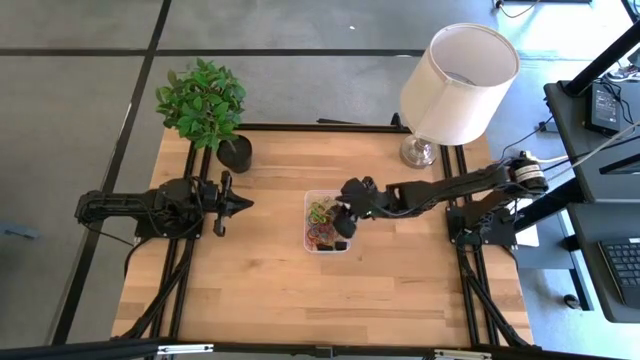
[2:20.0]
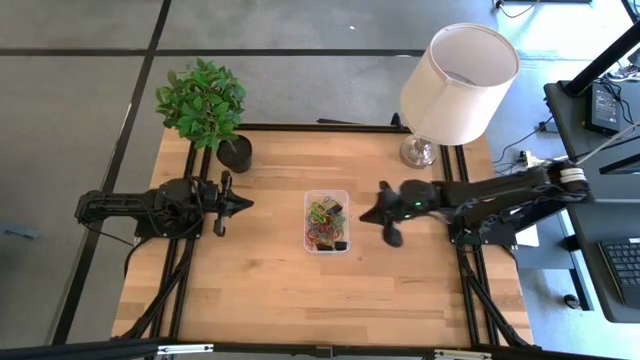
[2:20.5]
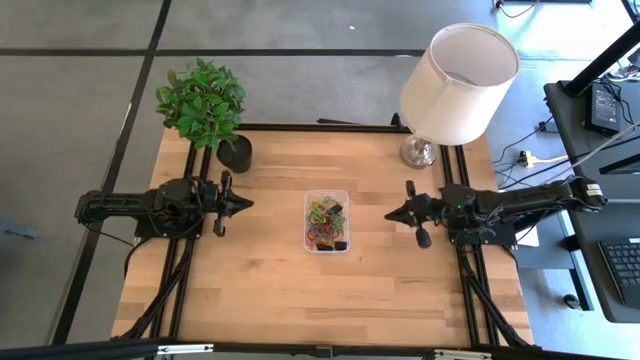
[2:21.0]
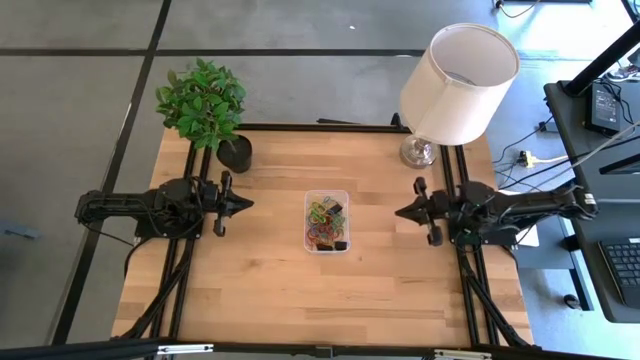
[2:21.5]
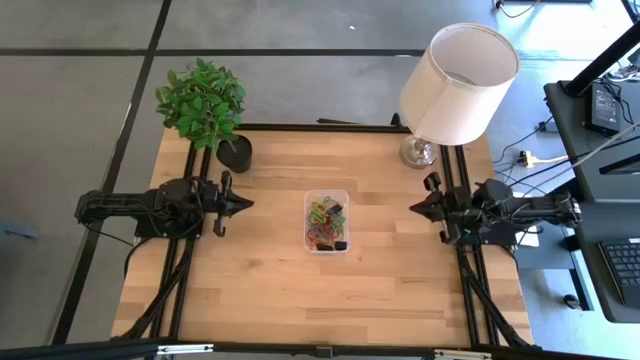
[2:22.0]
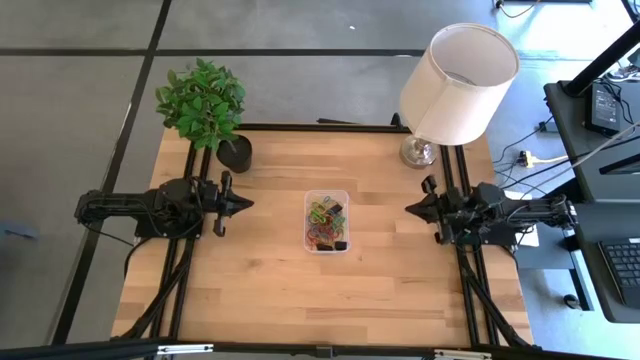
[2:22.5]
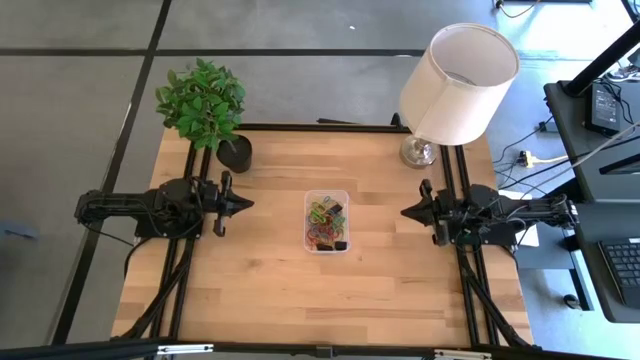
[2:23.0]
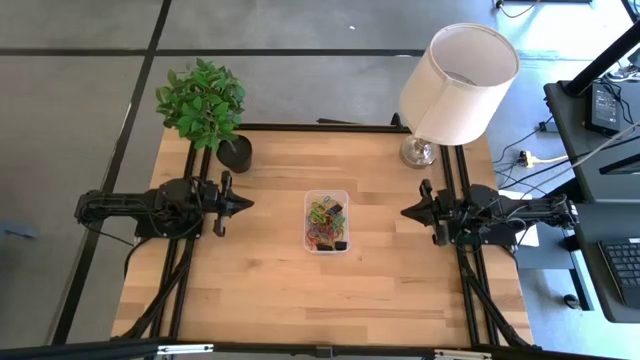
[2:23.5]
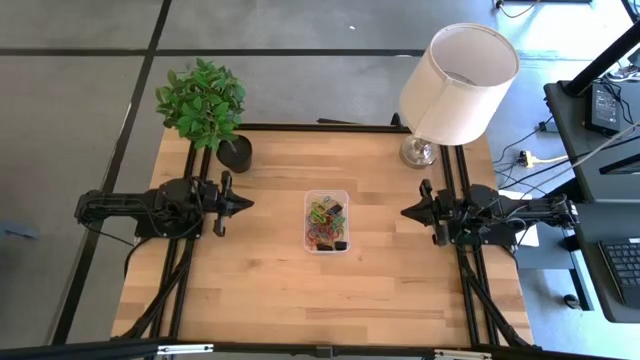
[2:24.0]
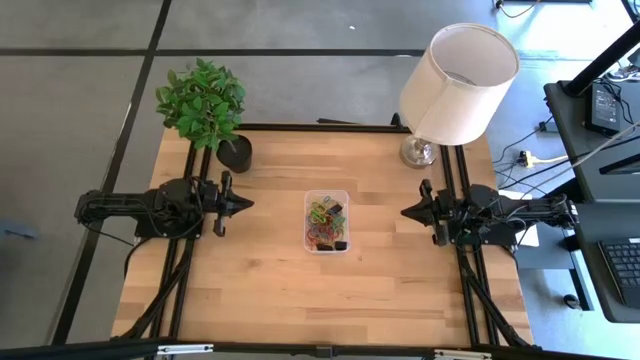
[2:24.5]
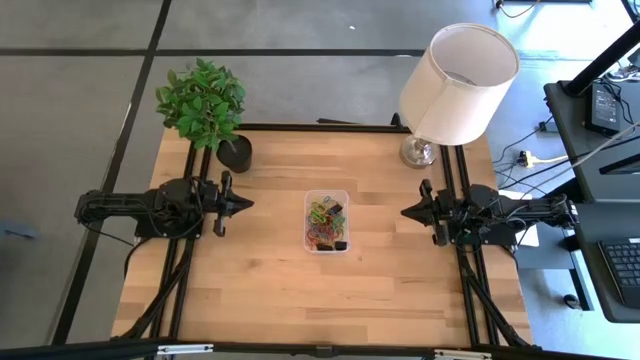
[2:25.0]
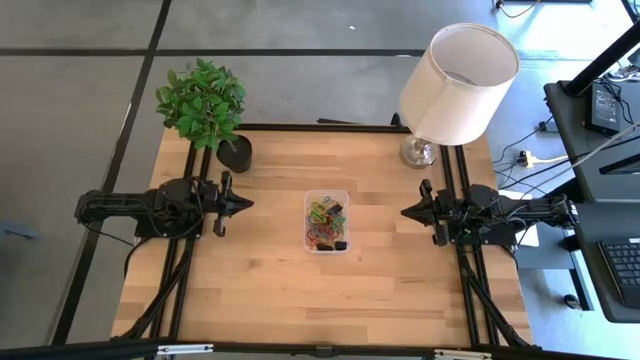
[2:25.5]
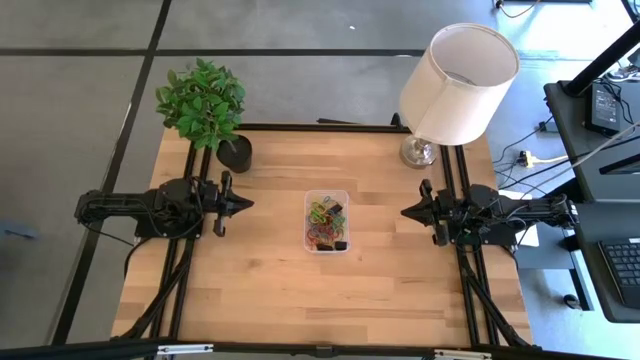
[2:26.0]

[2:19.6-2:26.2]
Task: Pick and place rubber bands into bin
Return to Home Position

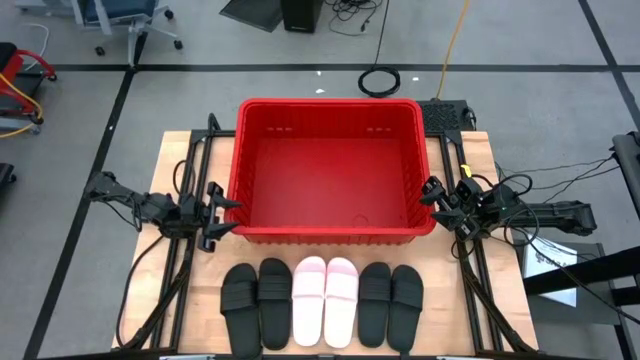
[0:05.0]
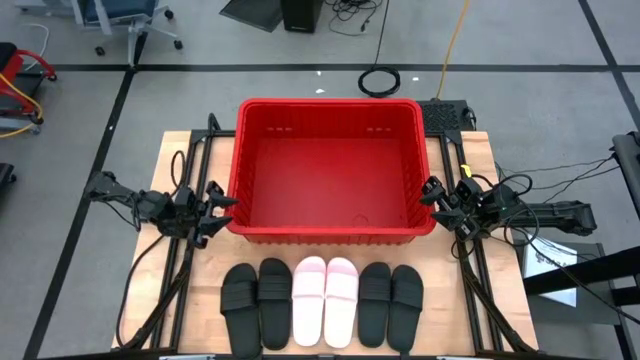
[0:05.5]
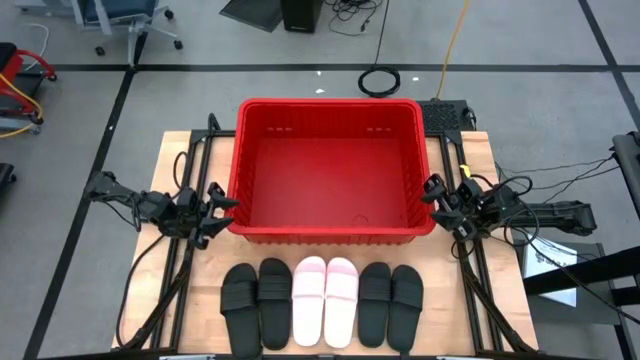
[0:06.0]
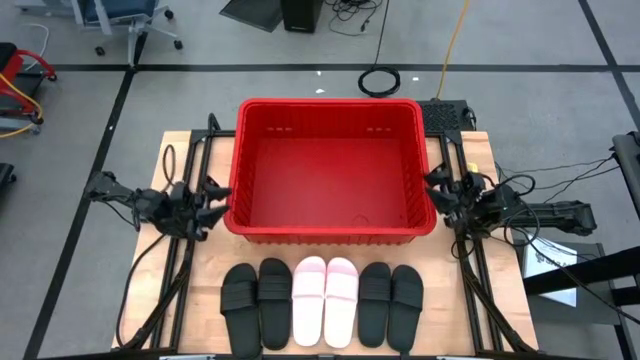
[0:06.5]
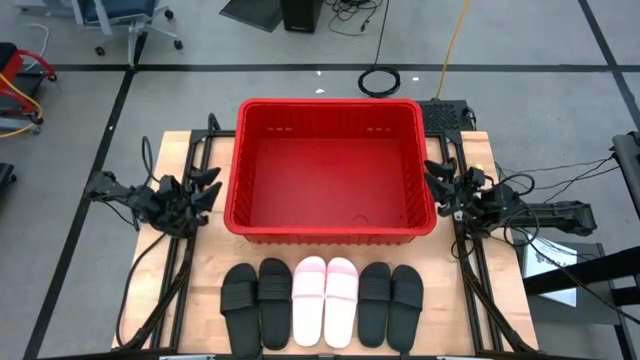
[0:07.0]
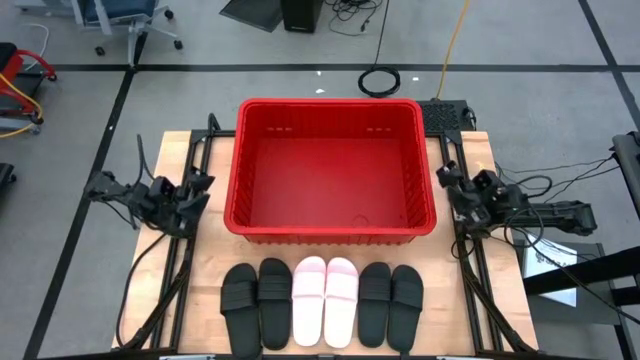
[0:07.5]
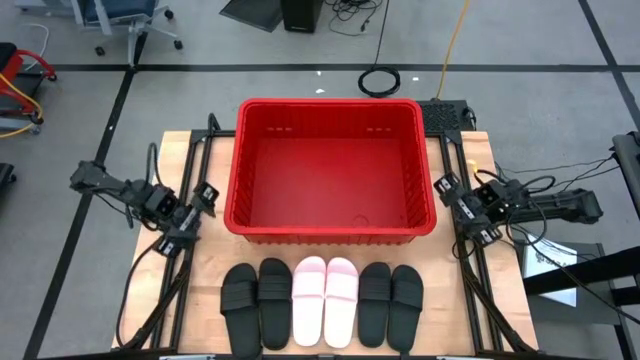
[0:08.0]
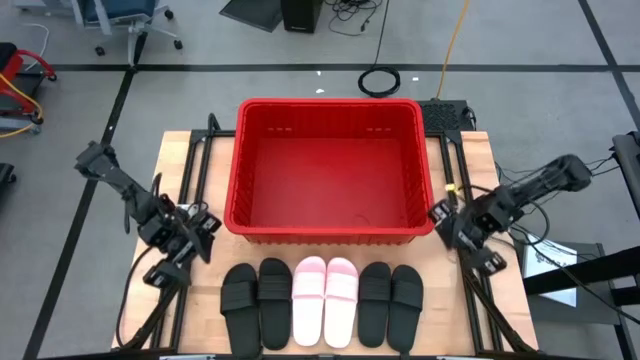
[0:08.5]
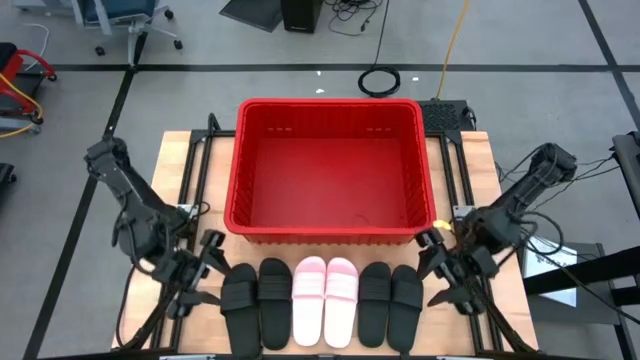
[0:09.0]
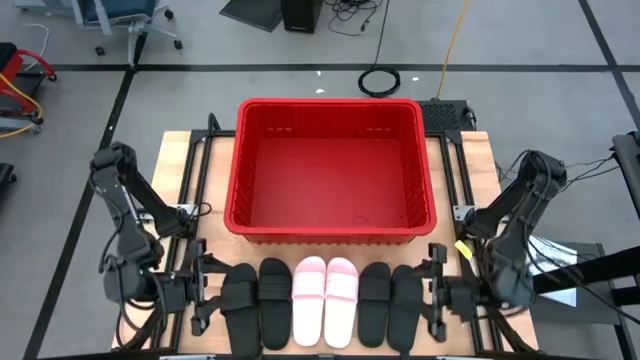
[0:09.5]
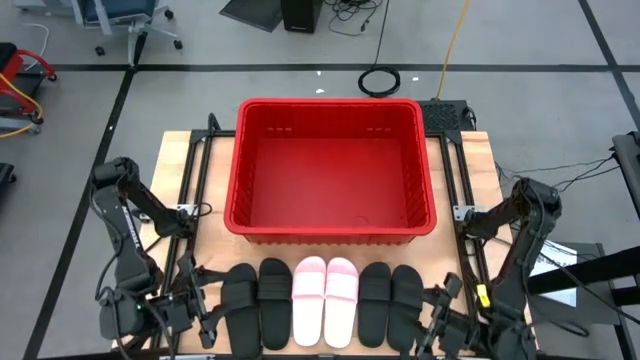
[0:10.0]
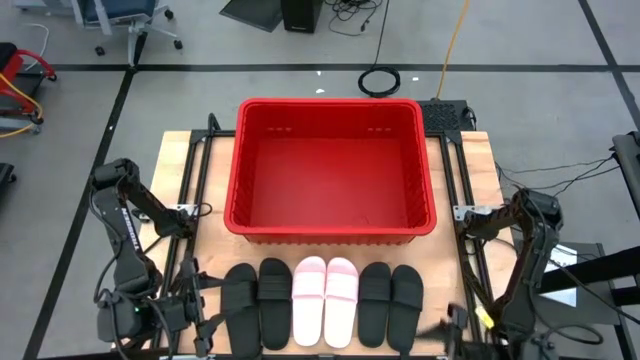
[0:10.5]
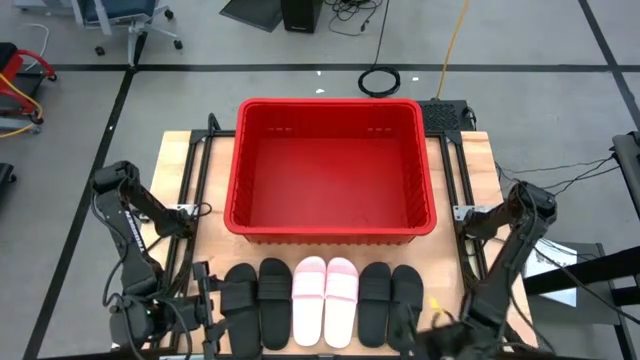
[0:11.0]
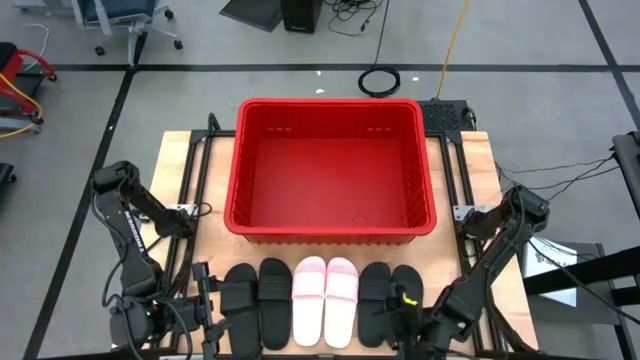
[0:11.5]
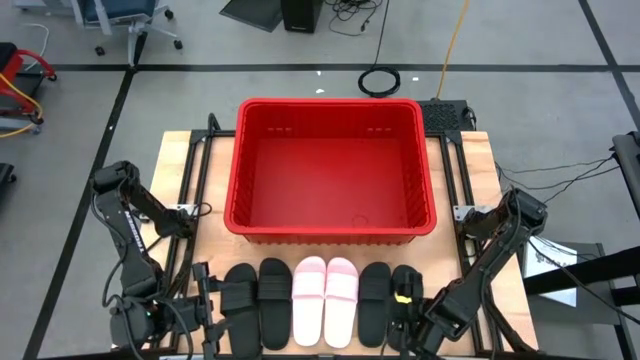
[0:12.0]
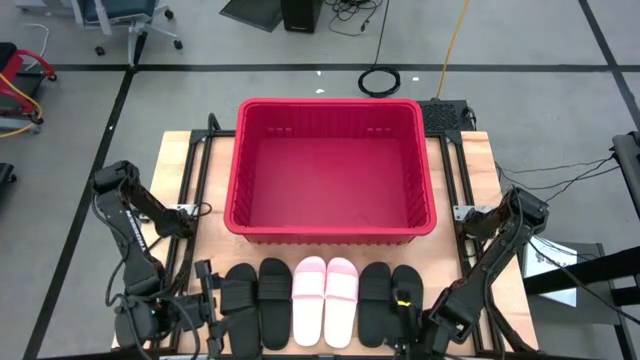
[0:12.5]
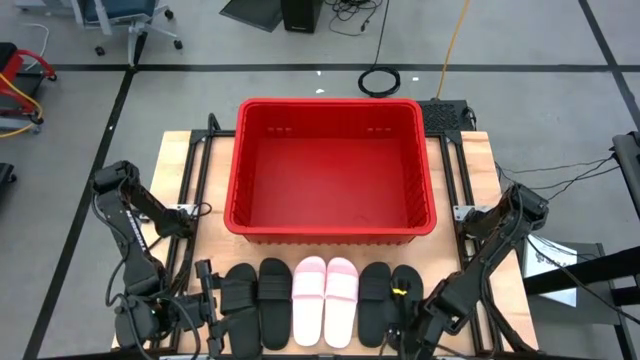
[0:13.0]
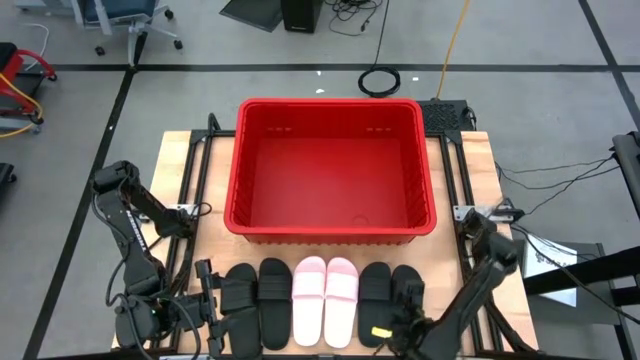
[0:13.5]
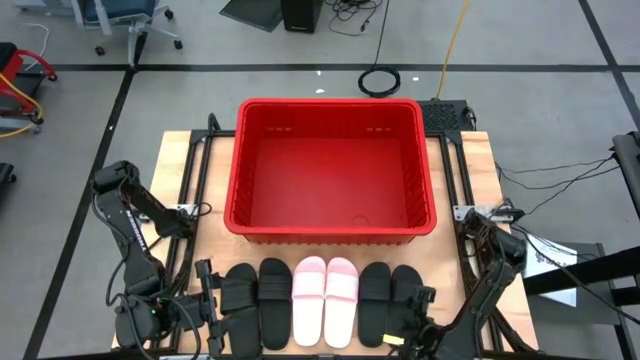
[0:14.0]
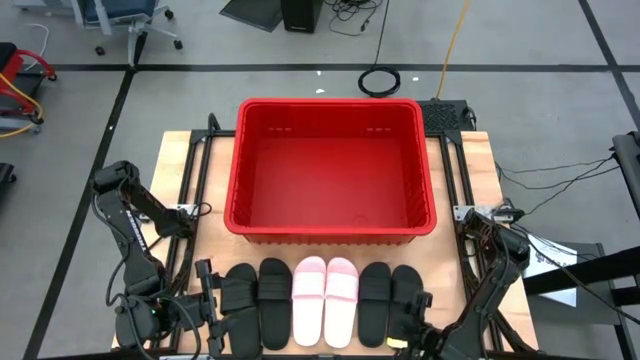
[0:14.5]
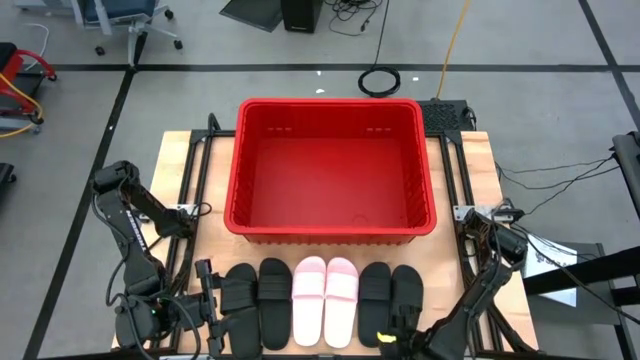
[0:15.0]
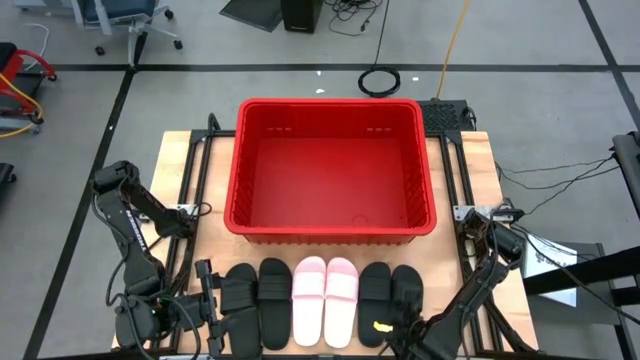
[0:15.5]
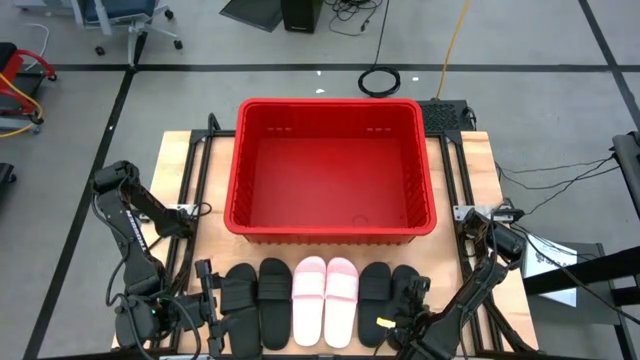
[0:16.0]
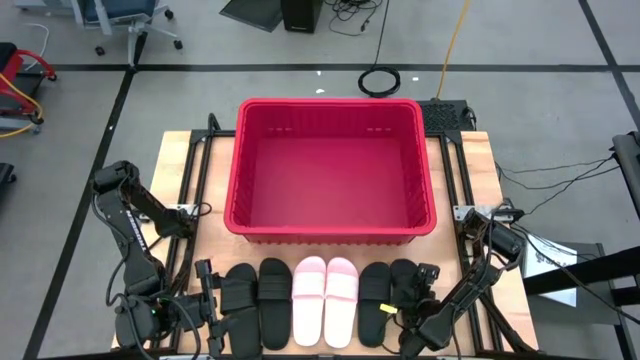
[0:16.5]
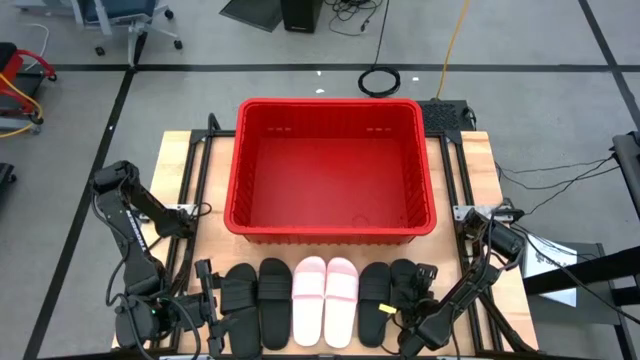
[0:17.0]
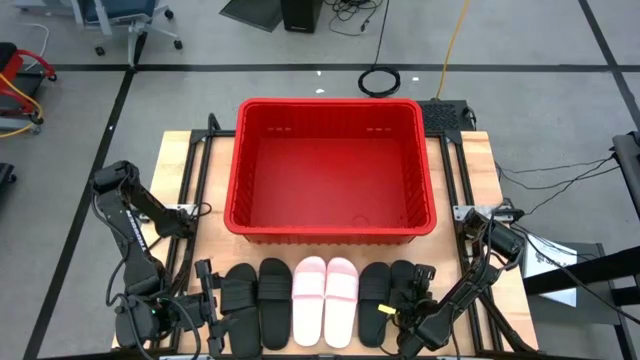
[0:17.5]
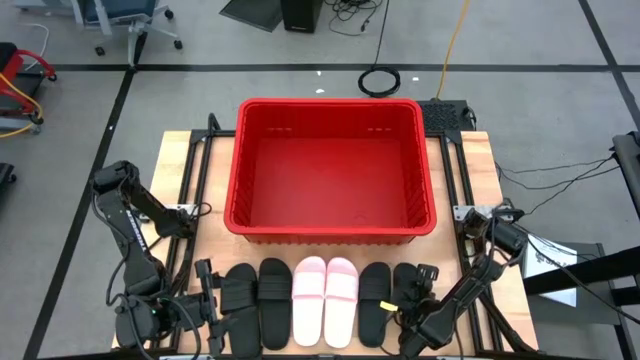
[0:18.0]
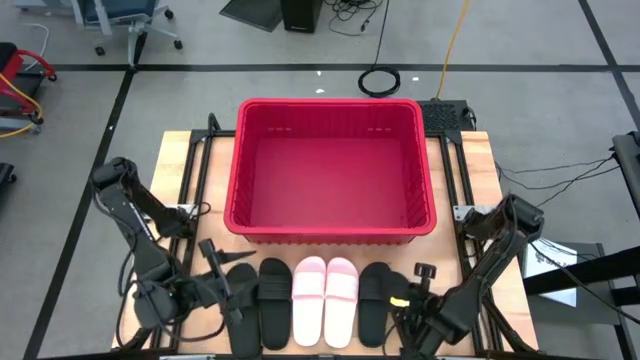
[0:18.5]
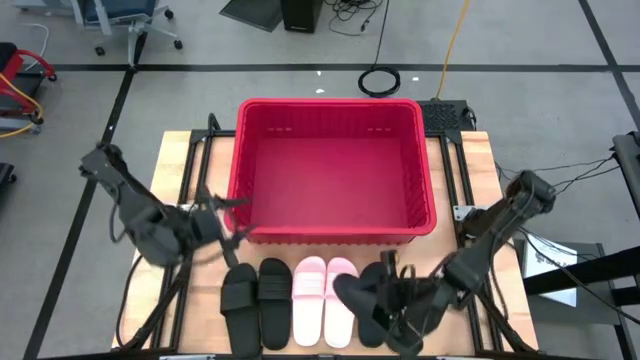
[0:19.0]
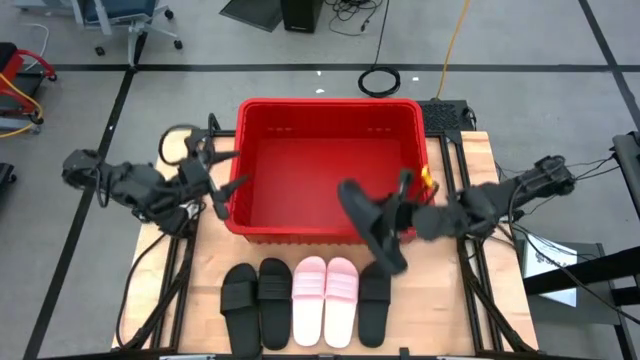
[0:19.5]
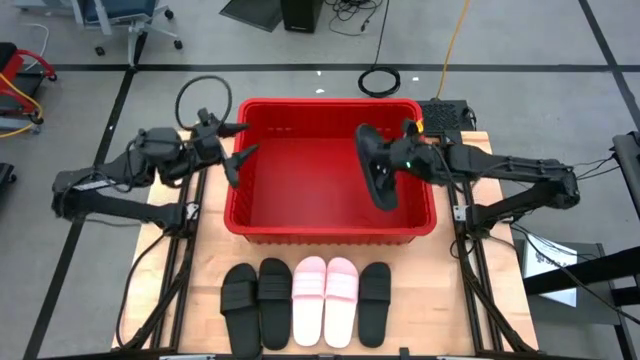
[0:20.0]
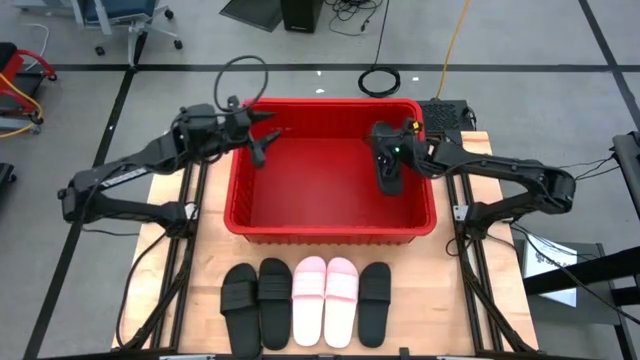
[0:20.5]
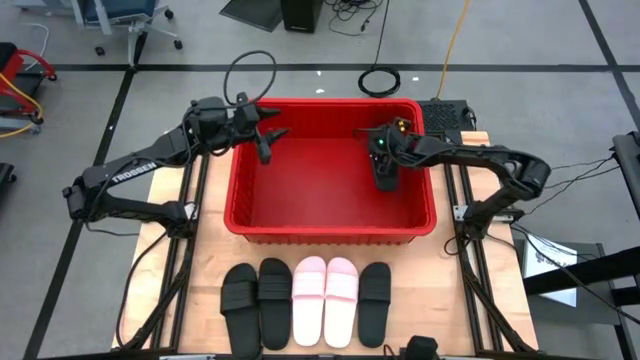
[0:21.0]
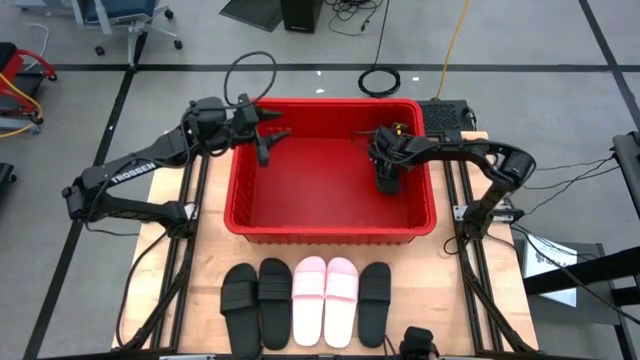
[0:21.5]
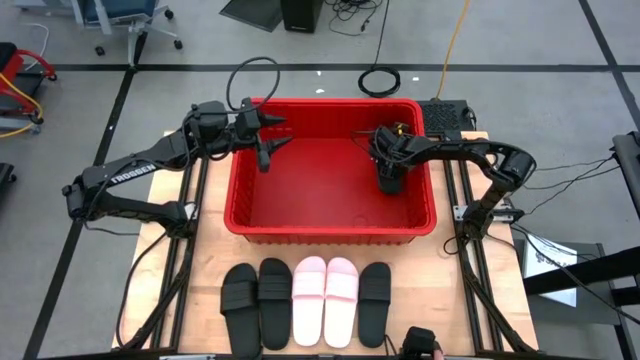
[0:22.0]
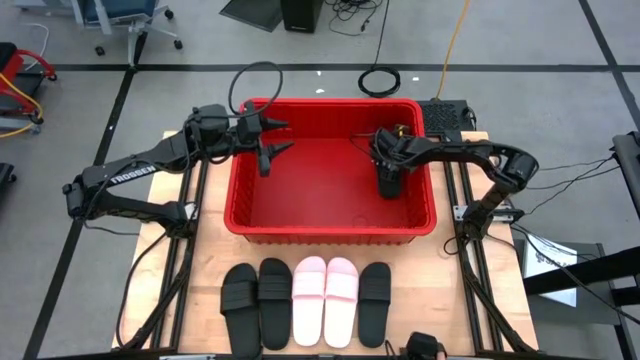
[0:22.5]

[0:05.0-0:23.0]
Task: Pick and place slides into bin
Put the black slide into the red bin
